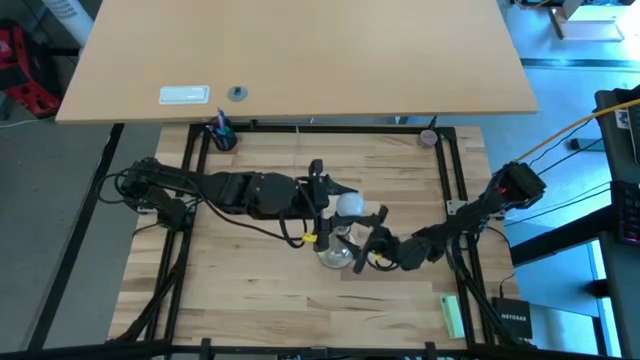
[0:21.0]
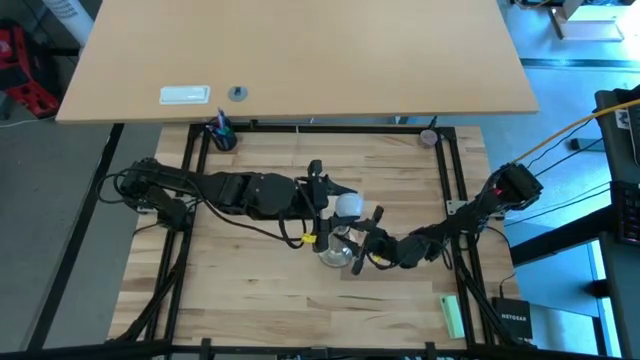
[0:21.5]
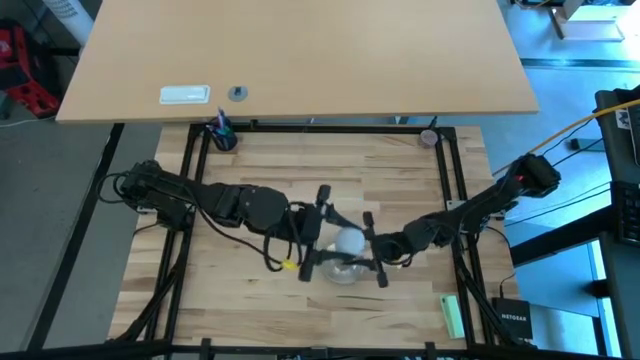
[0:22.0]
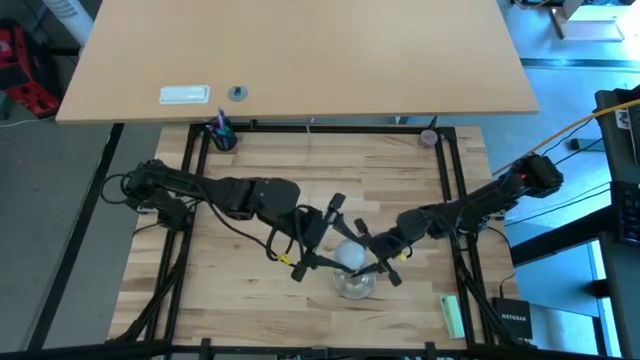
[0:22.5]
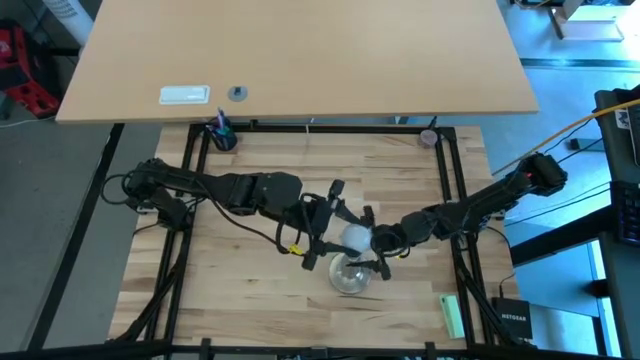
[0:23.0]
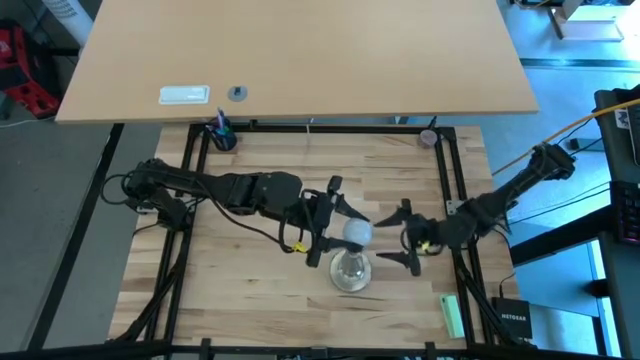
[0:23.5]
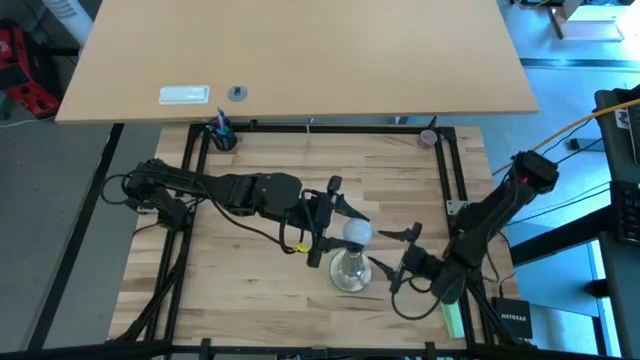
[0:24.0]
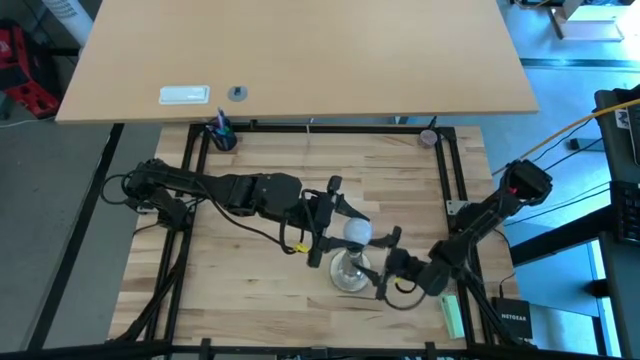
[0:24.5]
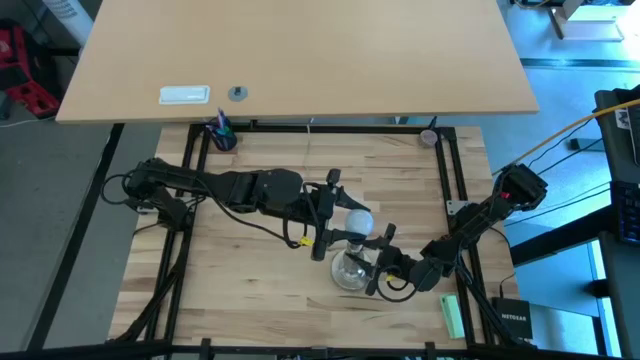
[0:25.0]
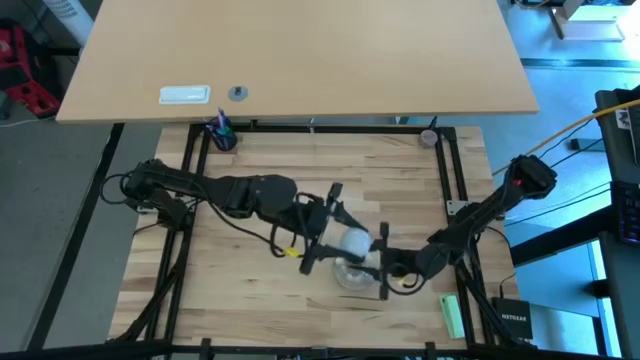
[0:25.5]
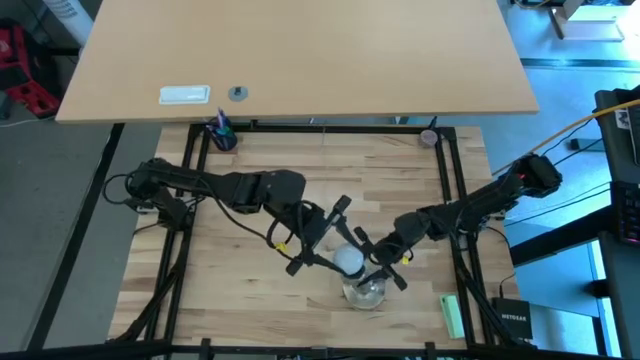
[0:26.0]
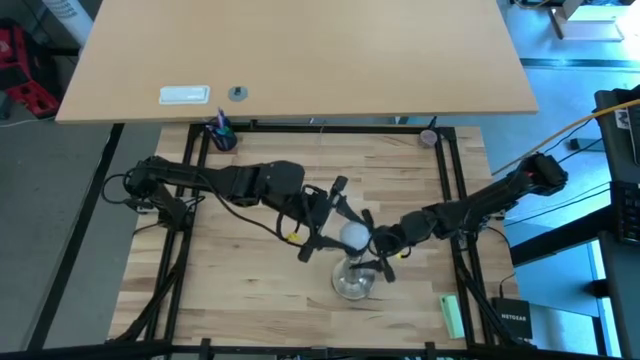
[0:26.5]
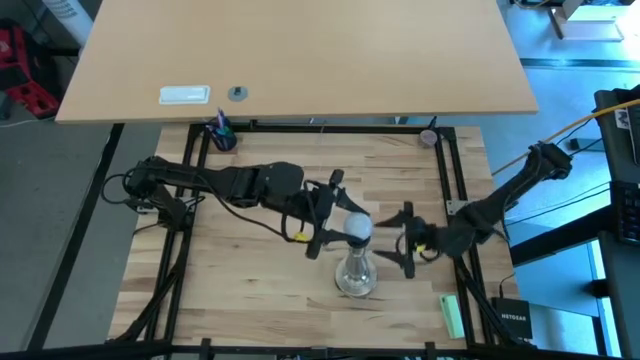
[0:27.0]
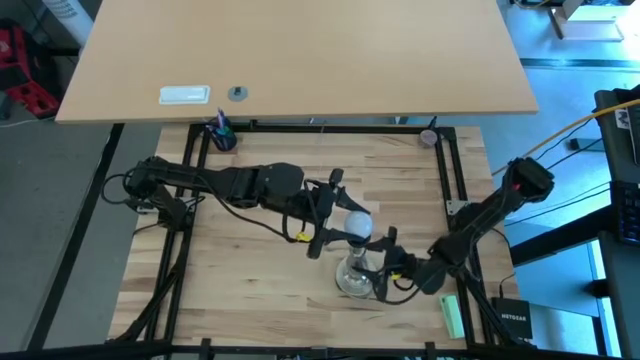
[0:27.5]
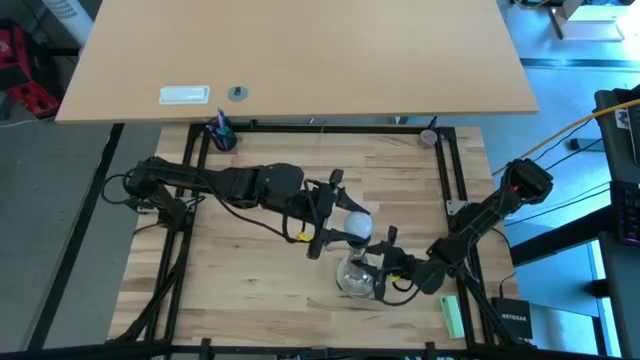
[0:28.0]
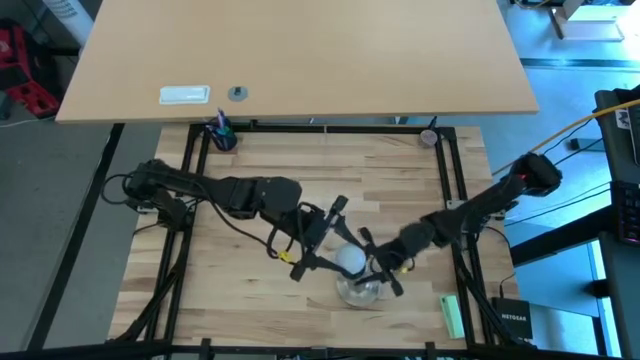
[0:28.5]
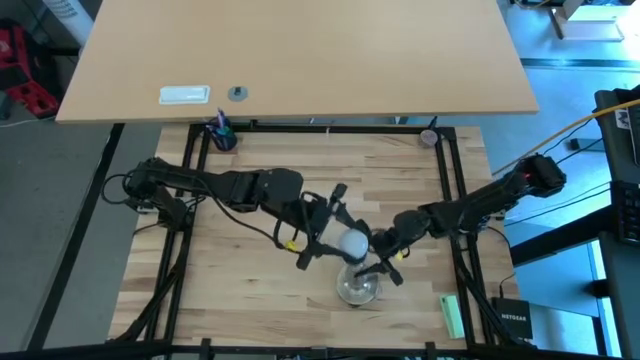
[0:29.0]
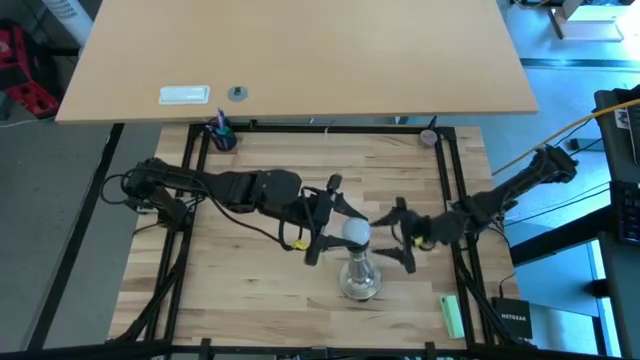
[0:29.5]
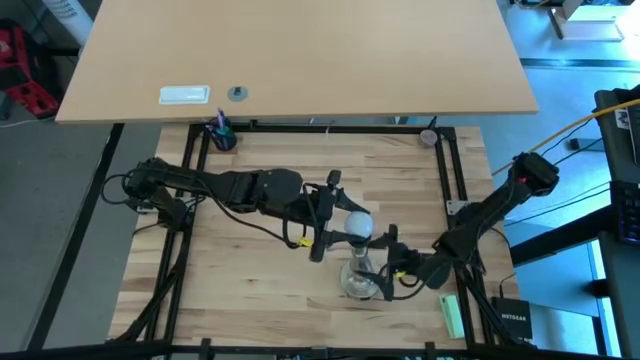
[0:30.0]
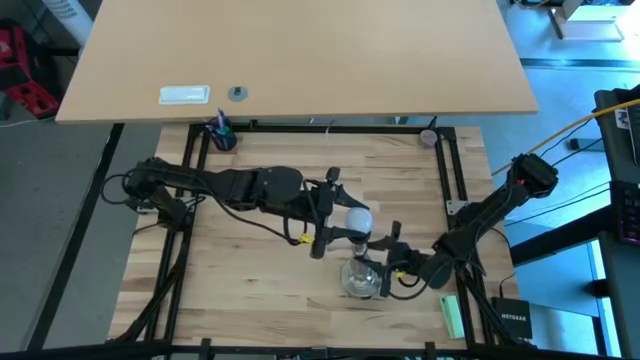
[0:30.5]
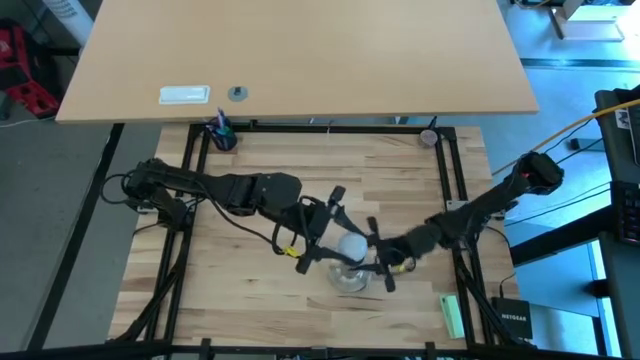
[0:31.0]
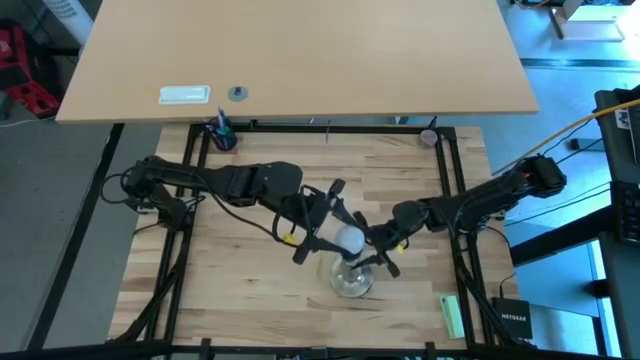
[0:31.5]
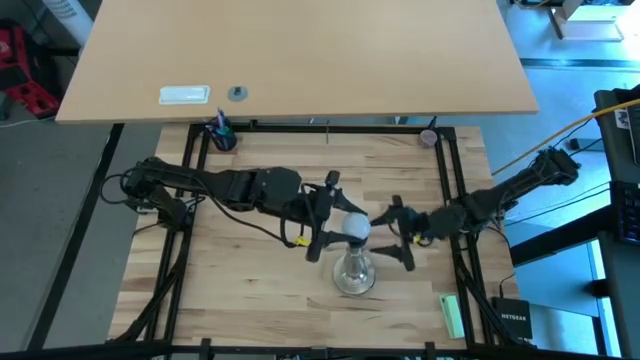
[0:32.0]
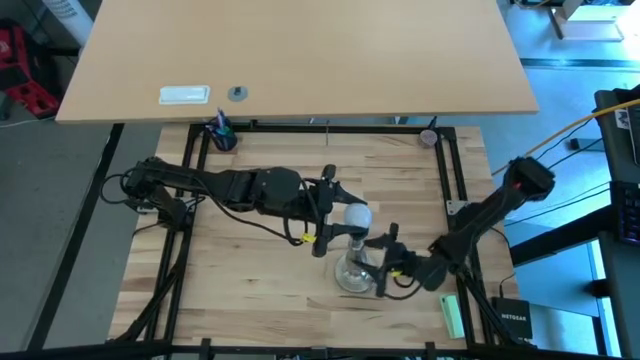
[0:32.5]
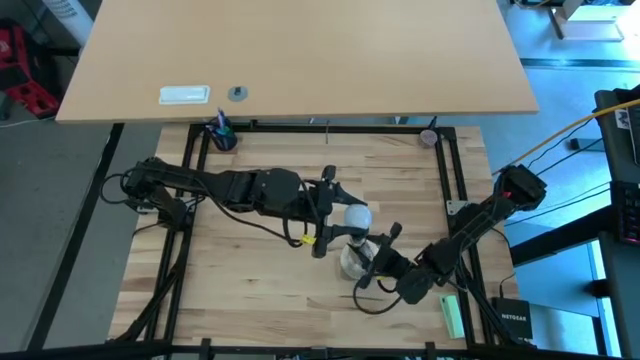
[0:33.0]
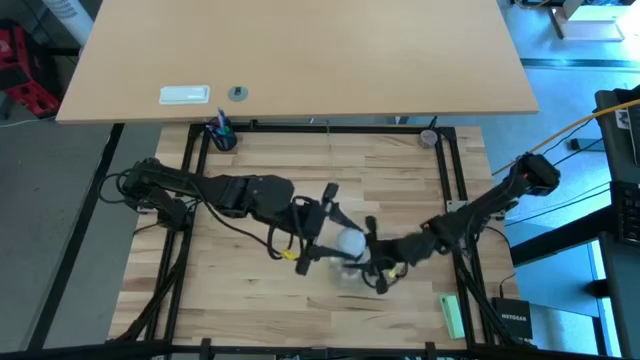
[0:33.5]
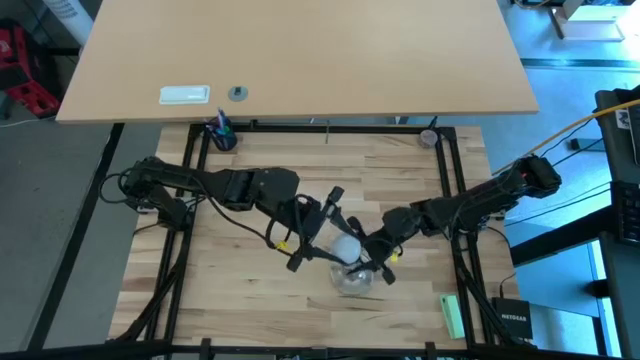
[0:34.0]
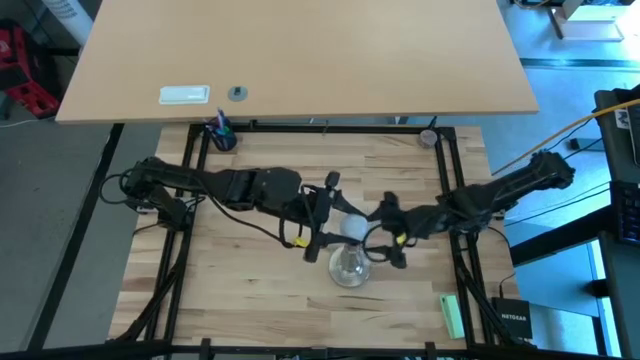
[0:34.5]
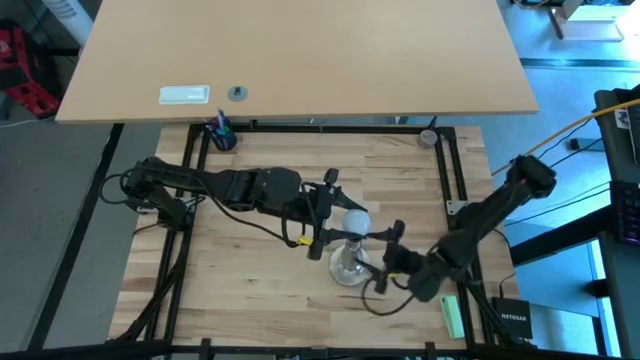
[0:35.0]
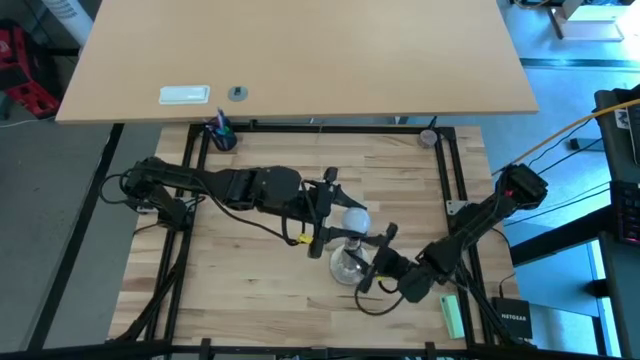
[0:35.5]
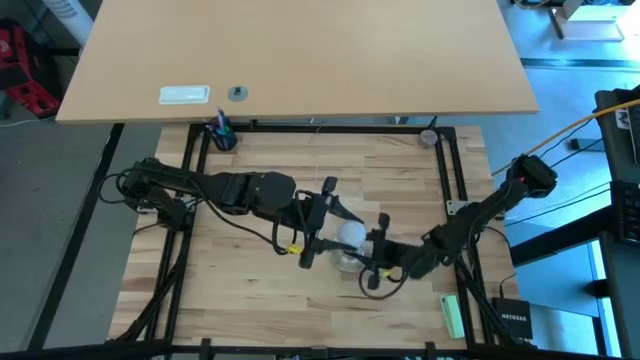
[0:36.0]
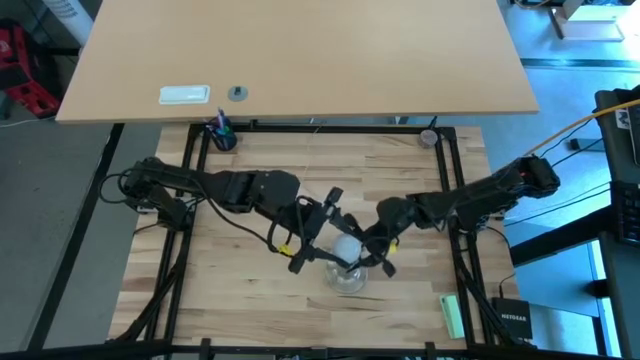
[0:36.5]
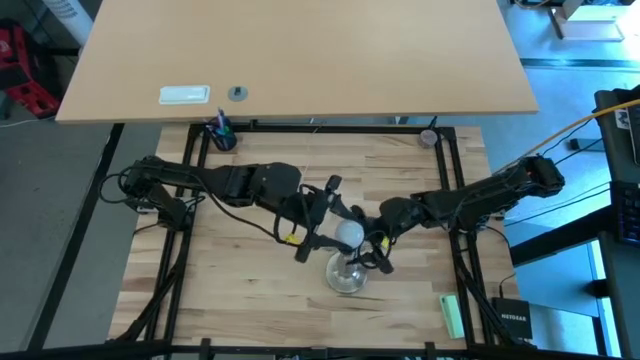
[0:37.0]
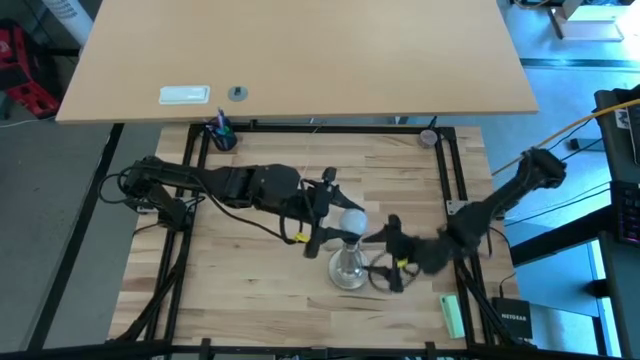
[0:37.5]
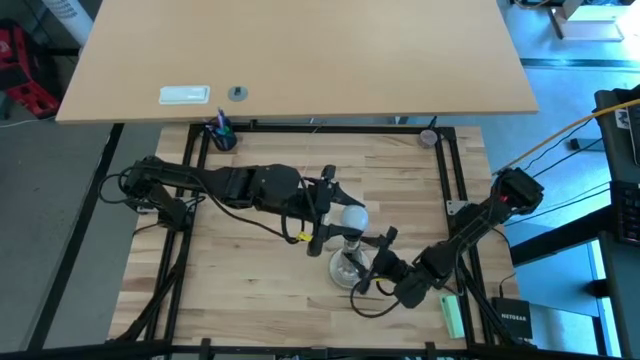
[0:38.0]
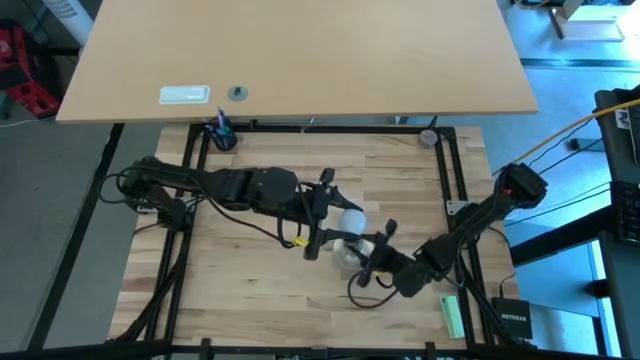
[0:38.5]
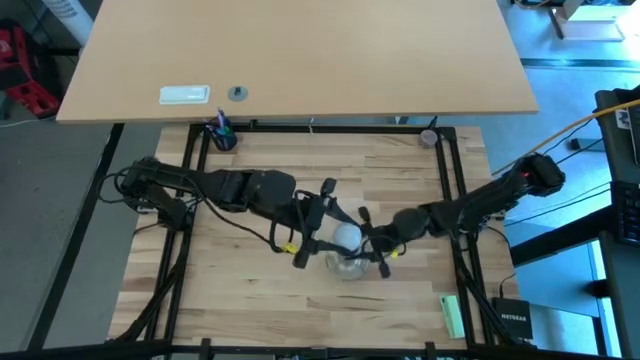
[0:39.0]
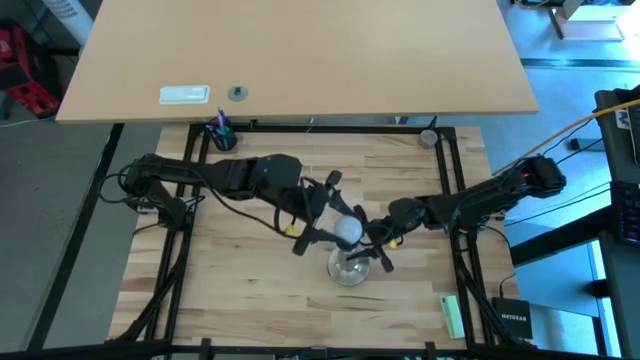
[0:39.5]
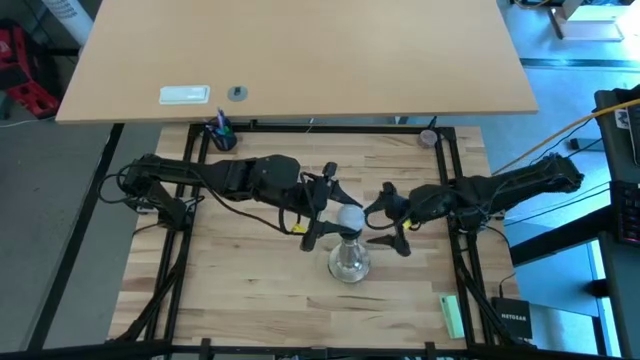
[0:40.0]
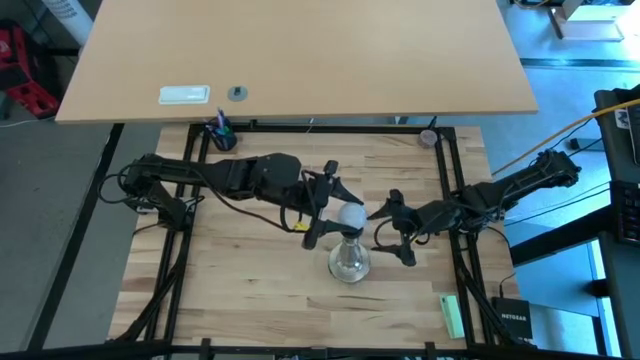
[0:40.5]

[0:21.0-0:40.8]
Task: Screw lightbulb
Insert the lightbulb into the lamp

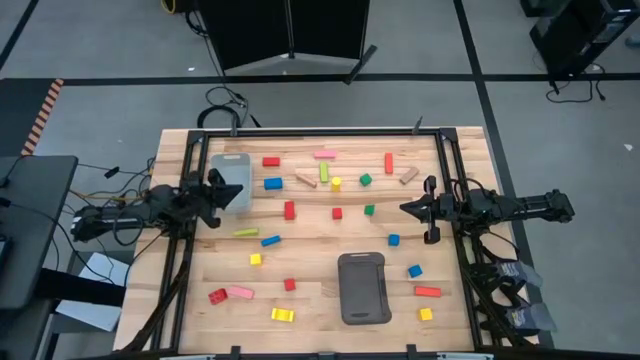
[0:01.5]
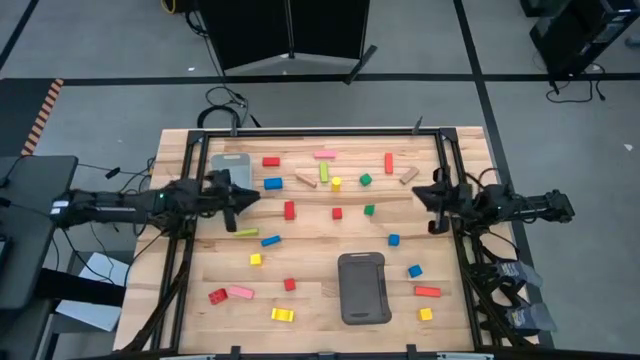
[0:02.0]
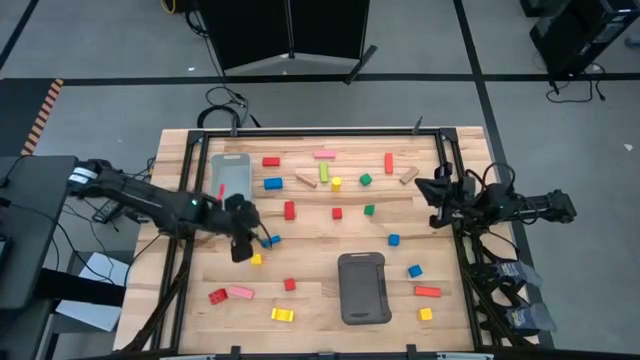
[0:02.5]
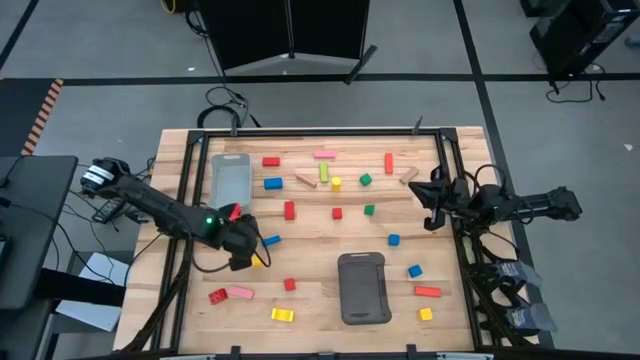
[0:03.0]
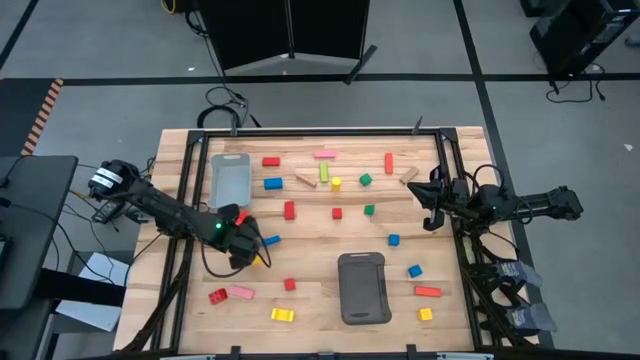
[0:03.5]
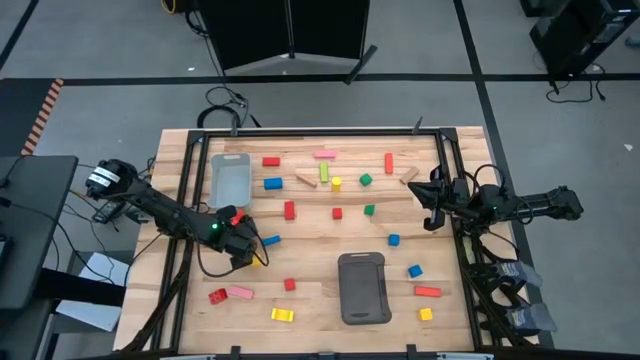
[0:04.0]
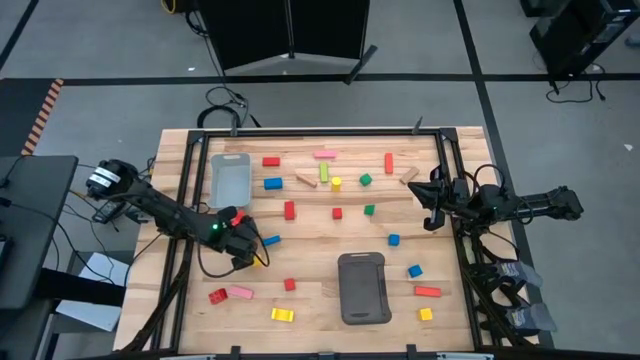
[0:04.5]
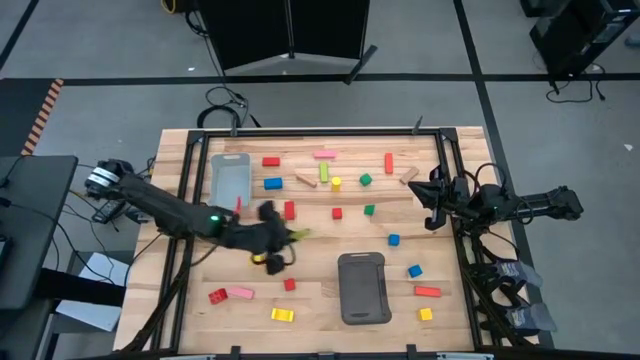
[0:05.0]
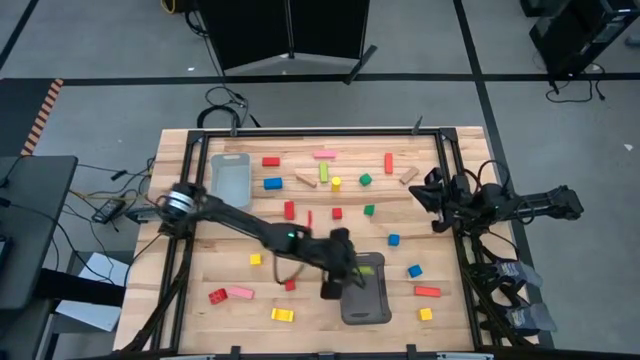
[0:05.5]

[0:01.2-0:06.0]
Task: Sort blocks by size
Put the green rectangular block into the black bin
